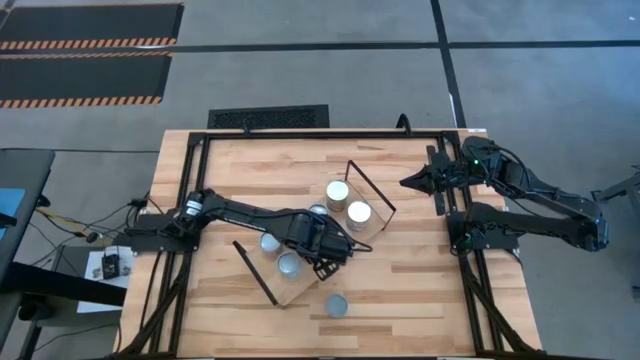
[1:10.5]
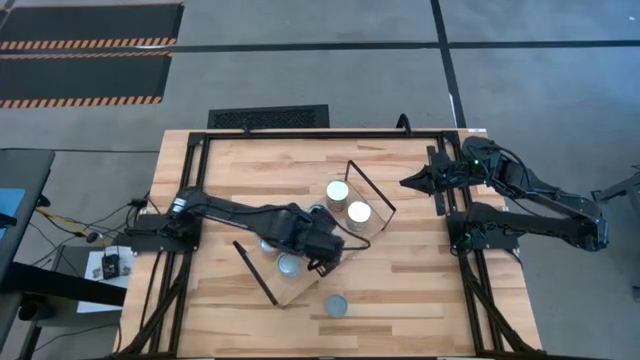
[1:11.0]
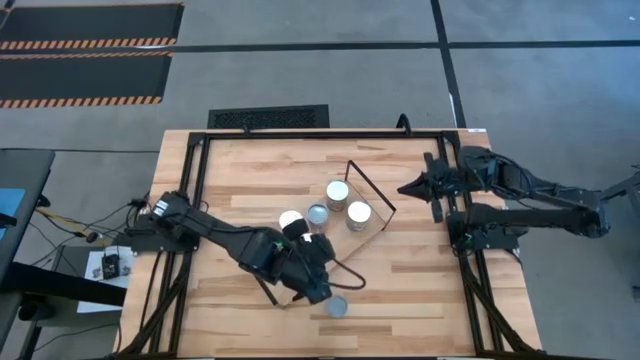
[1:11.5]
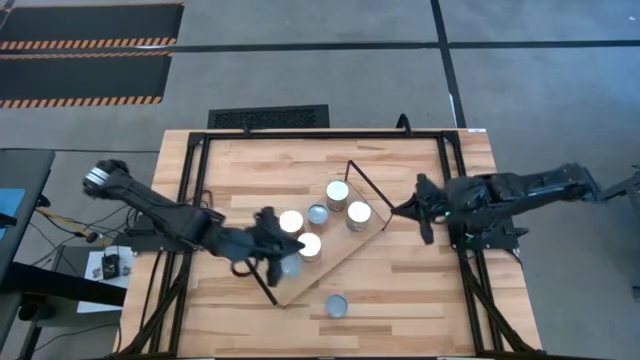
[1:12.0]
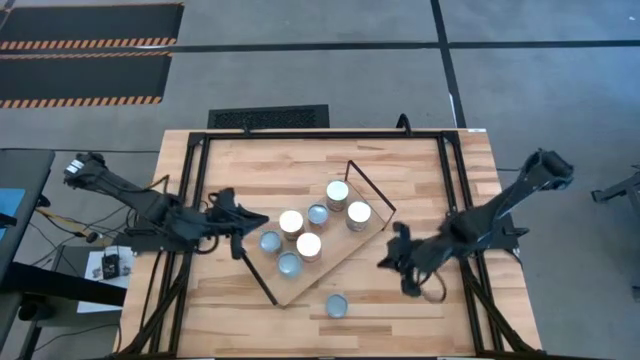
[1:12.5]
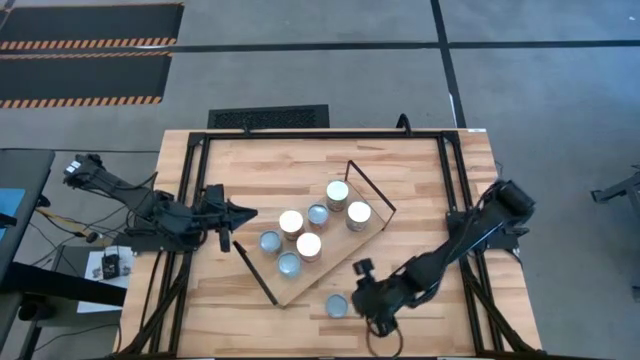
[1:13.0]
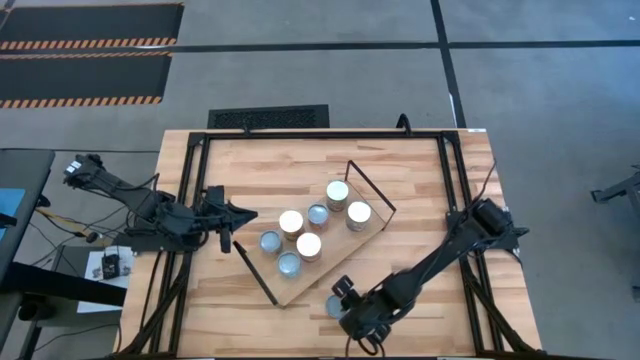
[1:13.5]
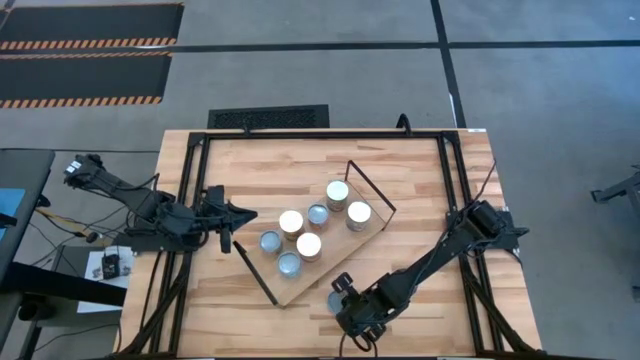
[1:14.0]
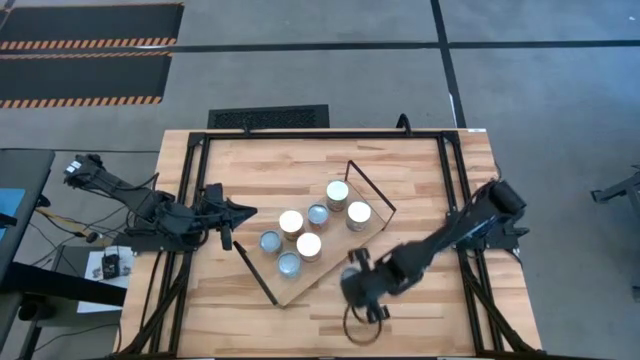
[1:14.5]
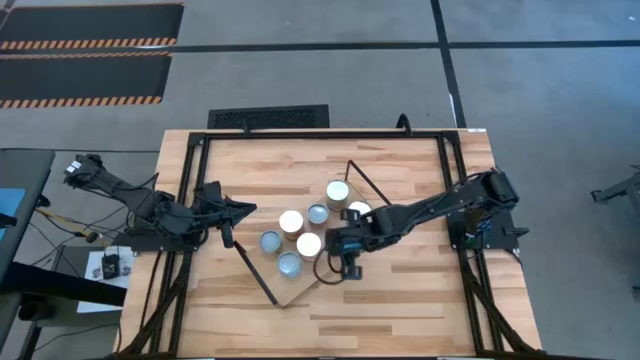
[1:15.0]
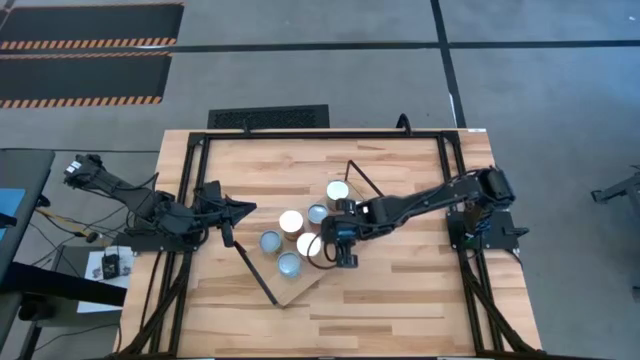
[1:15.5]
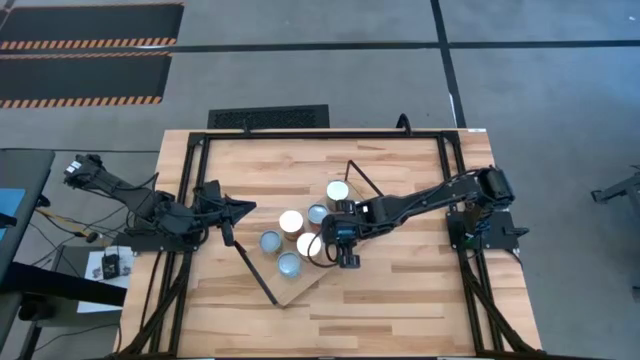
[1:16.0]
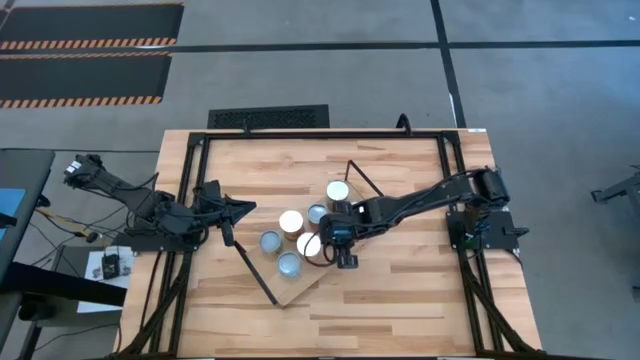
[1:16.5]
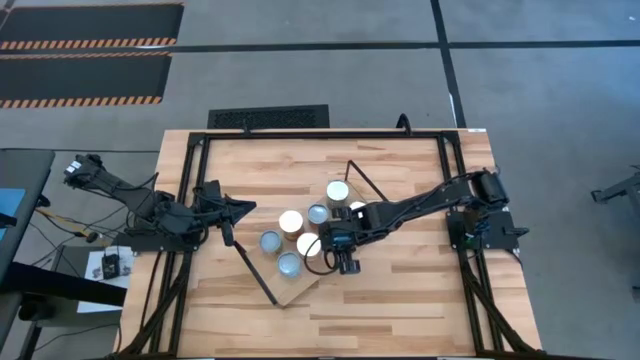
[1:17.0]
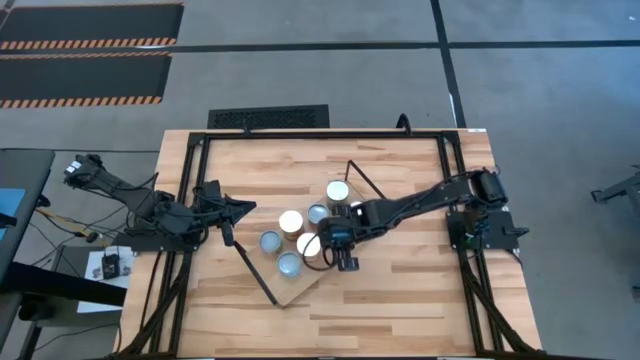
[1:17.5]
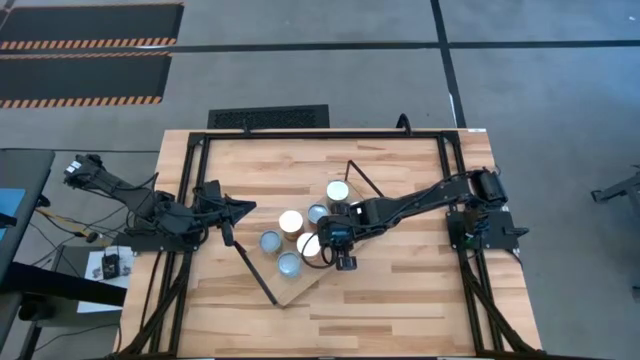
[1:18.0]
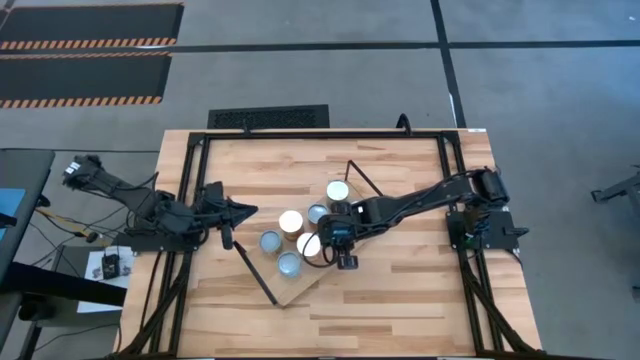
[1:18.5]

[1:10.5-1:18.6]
Task: Pick and place cans onto a shelf
Put the canned peas on the shelf

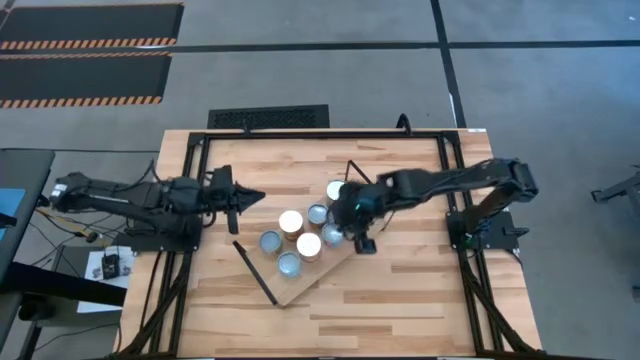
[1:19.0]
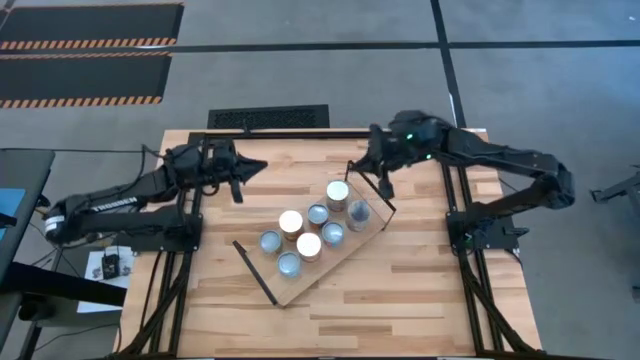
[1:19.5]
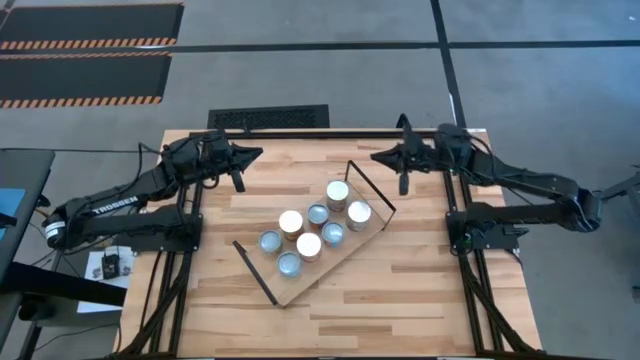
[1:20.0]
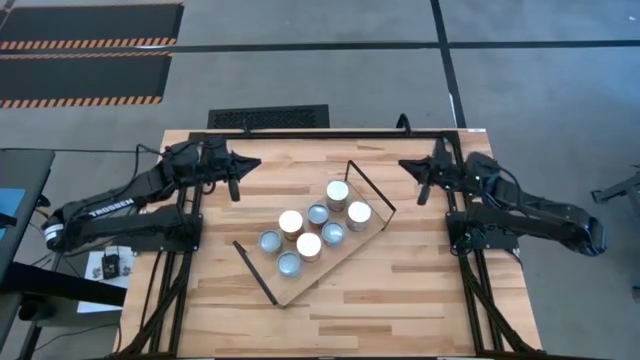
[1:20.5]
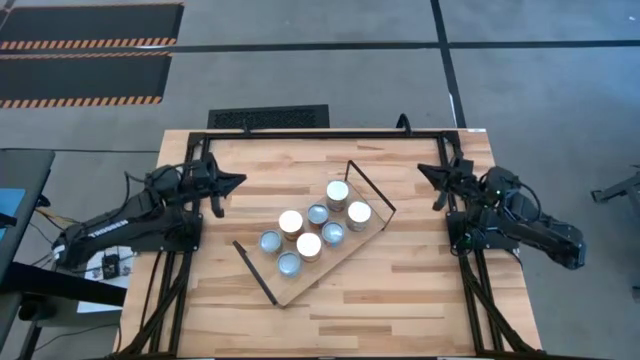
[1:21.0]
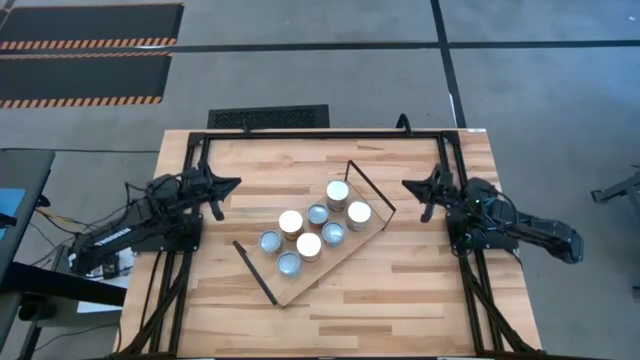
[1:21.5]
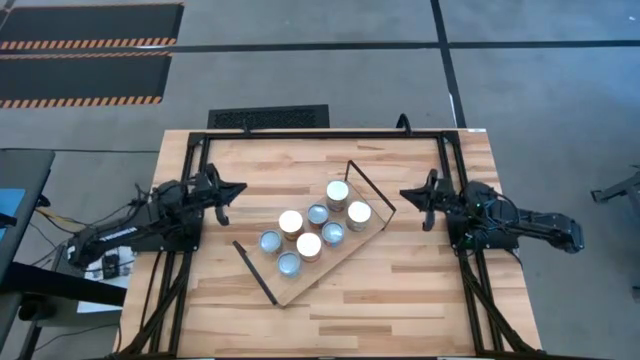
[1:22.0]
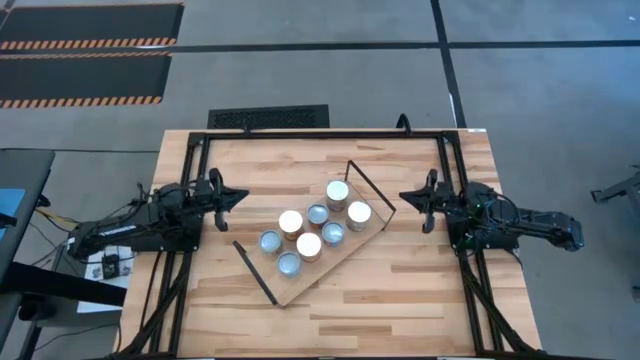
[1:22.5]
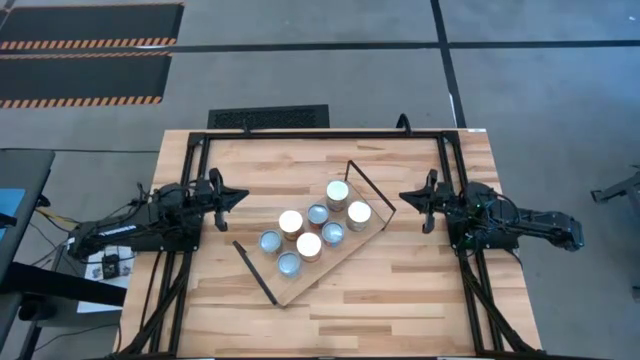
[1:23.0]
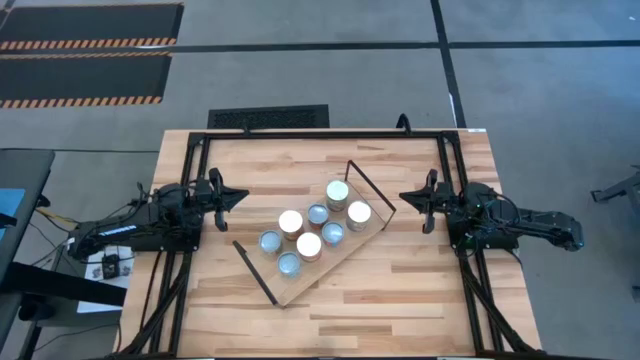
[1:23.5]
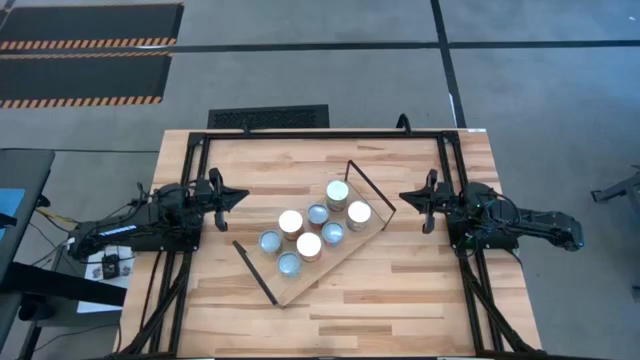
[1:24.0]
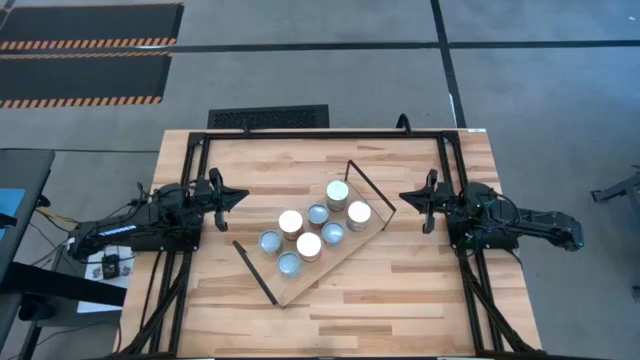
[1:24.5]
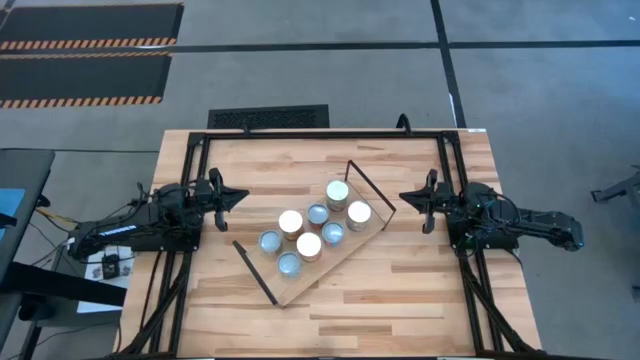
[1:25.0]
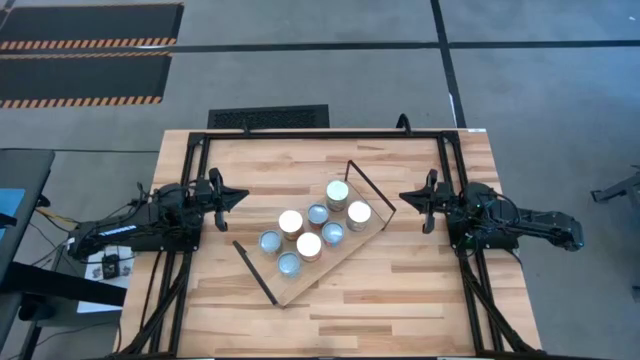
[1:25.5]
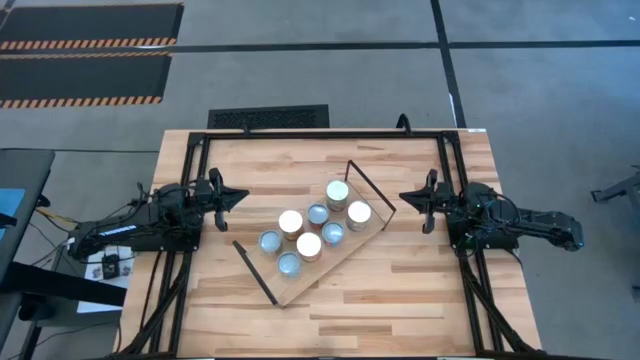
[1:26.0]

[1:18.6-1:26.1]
Return to Home Position

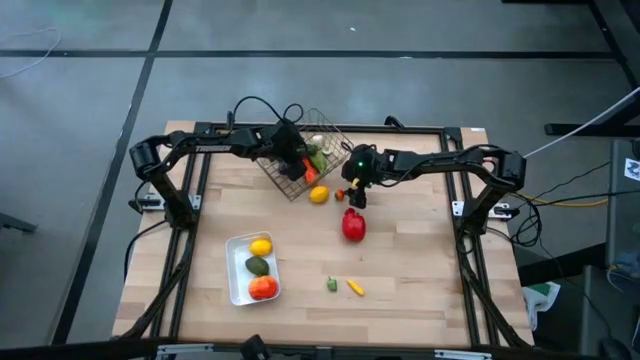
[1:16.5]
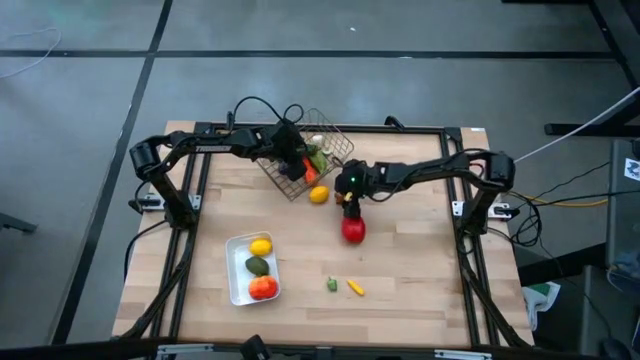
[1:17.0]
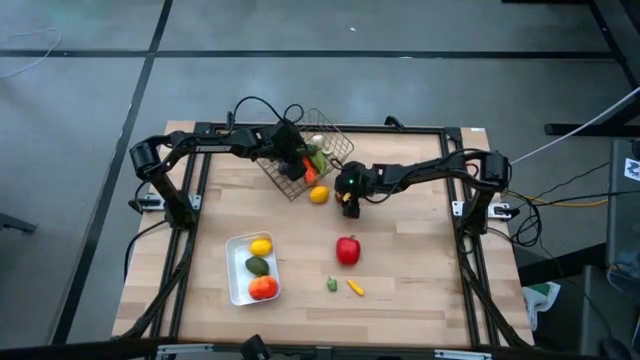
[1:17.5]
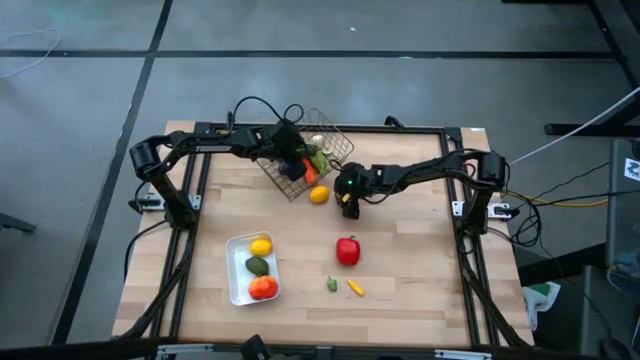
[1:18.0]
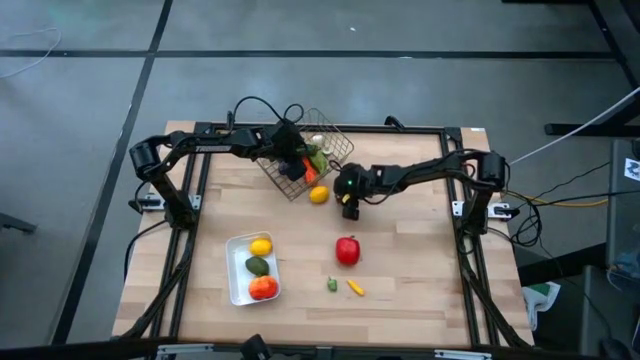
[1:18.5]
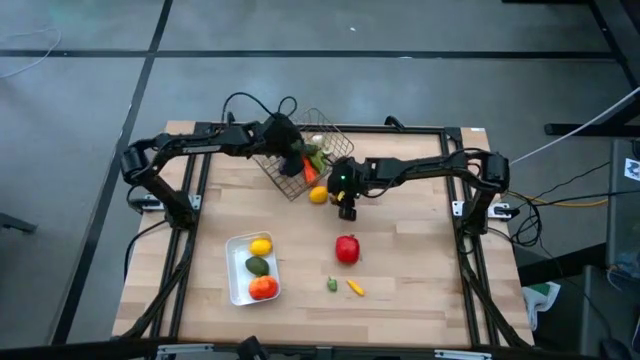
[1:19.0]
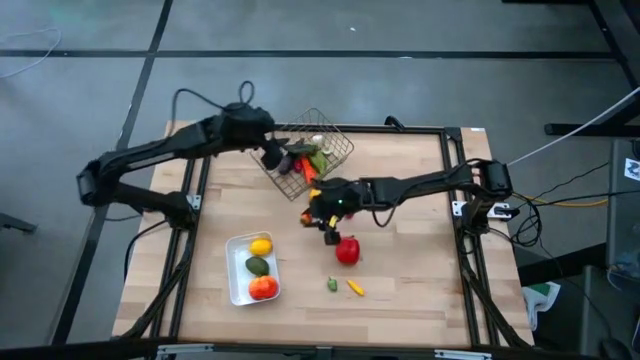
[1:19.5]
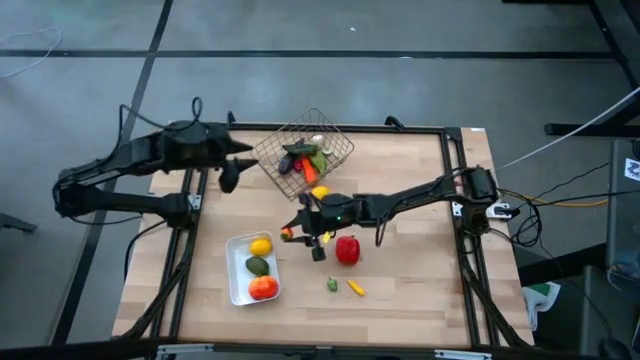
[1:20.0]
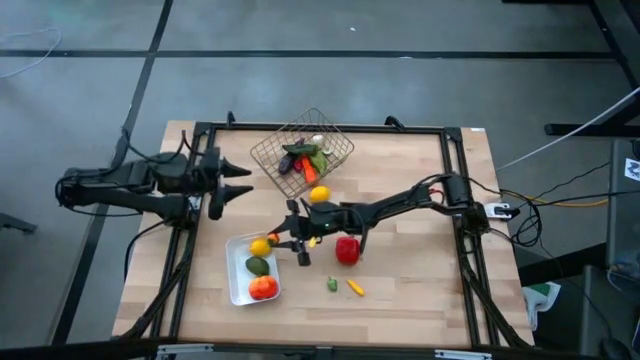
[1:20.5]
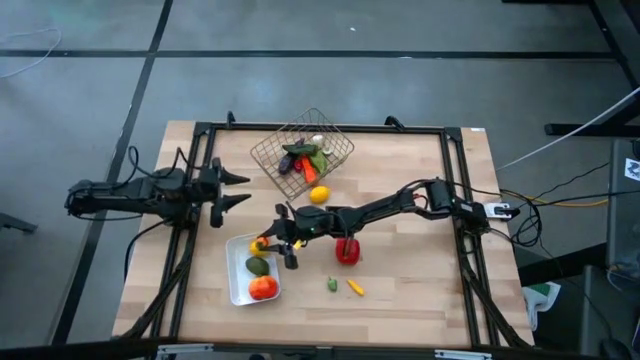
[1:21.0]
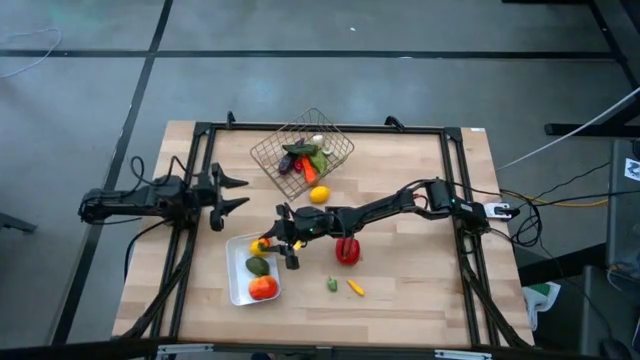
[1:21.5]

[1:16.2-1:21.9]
Task: Sort produce into baskets
Put the small orange persimmon into the white bin
